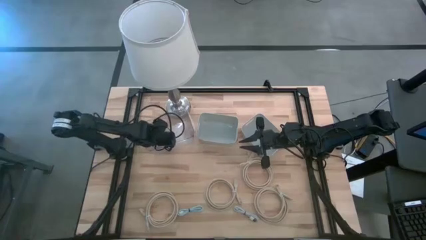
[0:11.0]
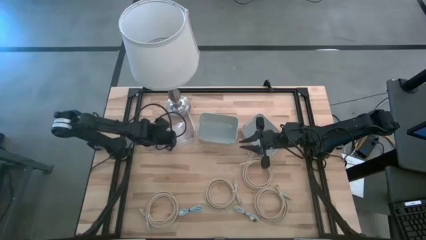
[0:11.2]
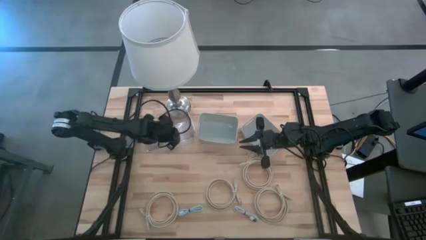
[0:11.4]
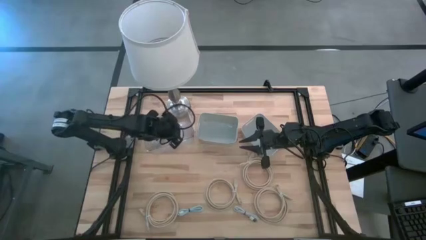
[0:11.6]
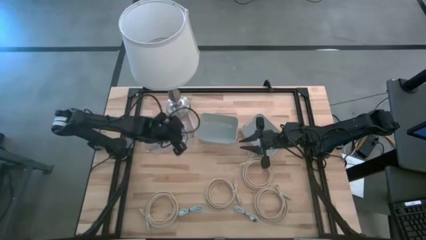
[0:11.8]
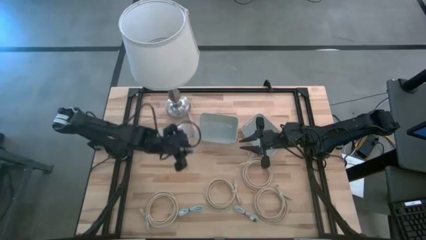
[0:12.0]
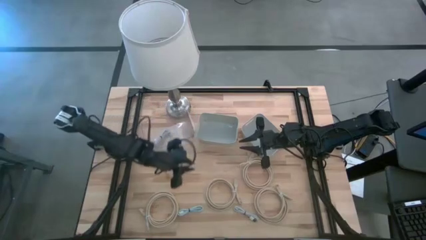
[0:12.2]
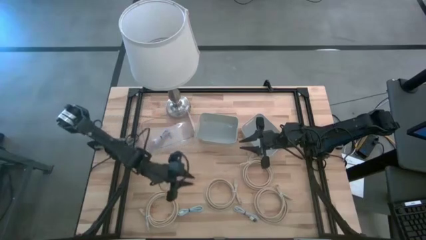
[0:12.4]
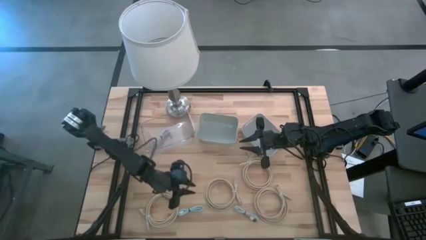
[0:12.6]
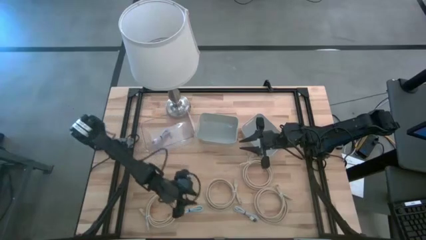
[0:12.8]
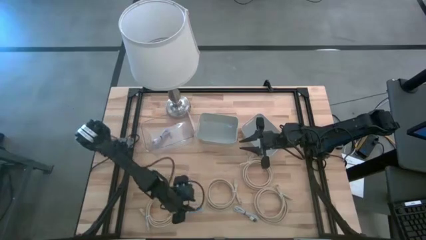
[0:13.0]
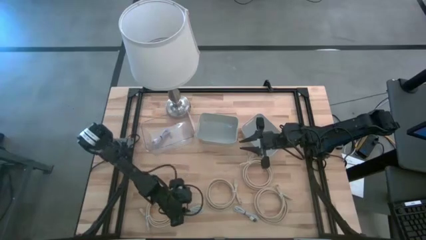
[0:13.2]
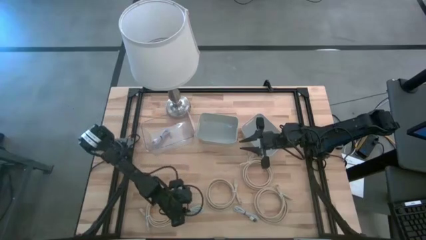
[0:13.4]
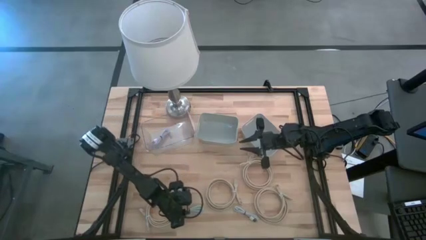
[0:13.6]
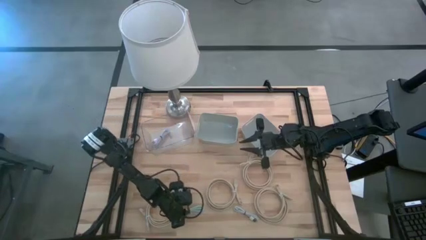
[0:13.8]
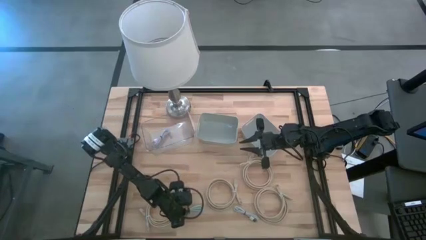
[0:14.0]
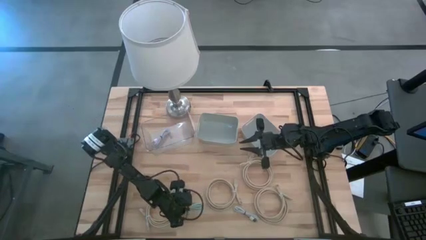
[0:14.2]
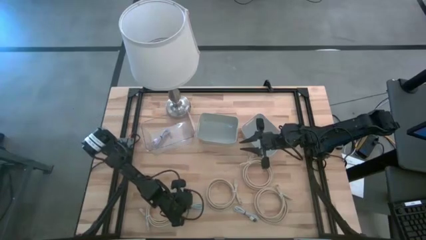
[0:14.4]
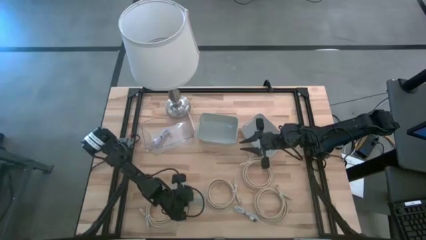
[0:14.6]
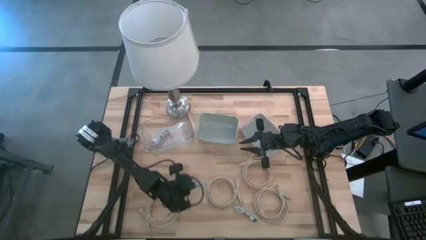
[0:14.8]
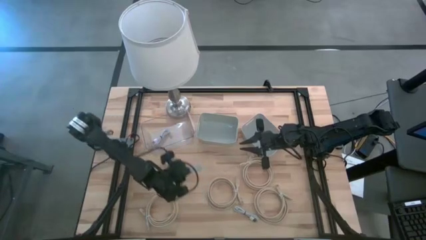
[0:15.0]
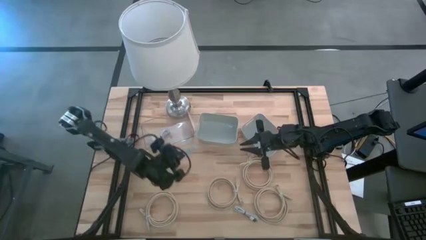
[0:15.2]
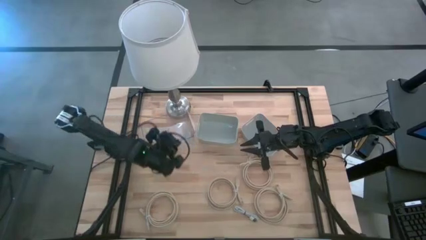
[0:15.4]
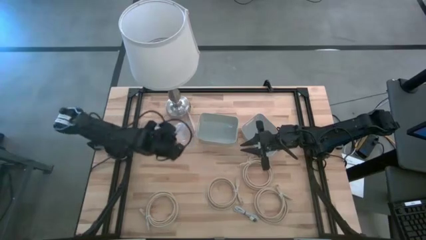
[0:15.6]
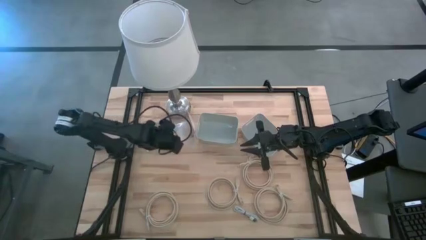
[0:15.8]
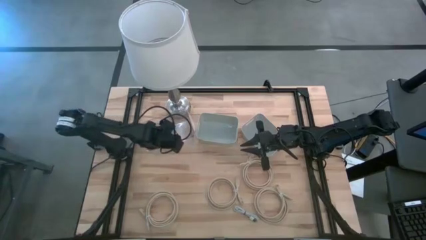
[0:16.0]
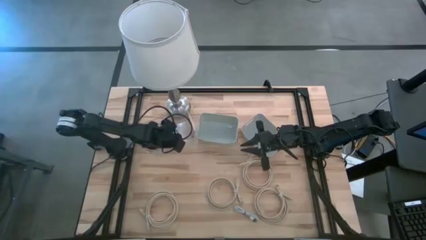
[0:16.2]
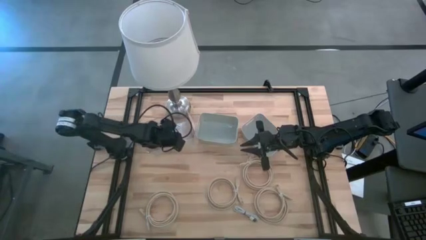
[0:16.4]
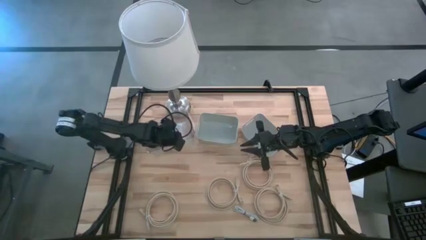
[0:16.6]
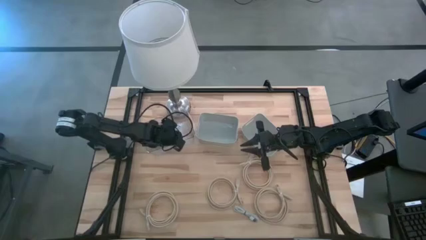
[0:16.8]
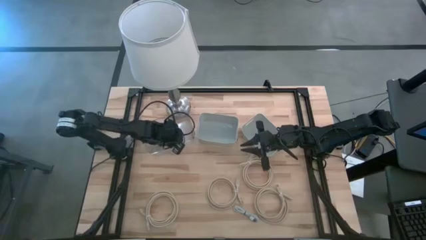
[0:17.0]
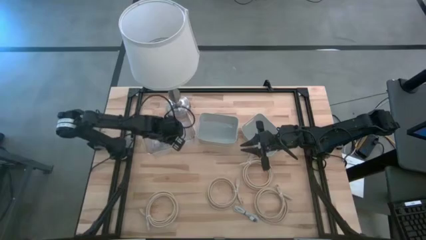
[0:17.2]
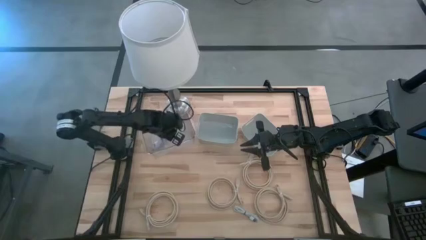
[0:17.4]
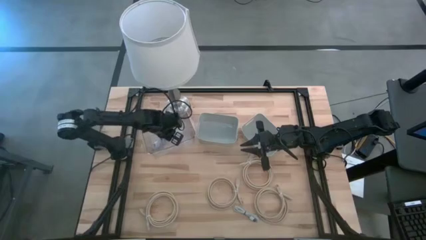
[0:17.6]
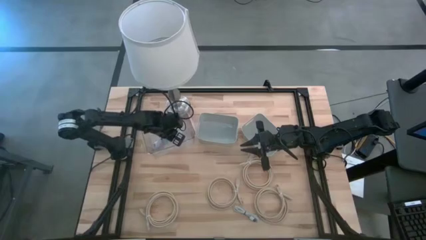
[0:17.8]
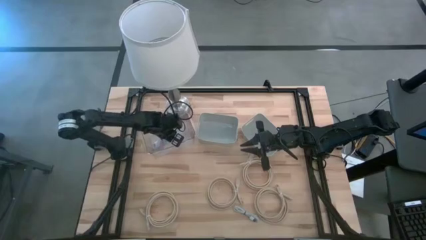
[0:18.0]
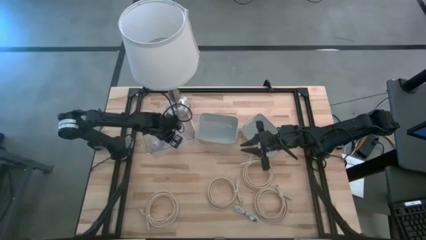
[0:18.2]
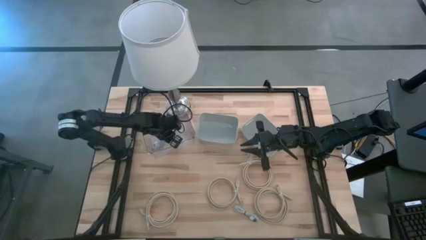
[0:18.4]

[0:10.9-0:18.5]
Task: Pick & Place USB Port
Put the blue usb cable into the transparent bin

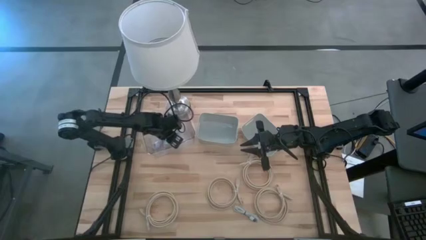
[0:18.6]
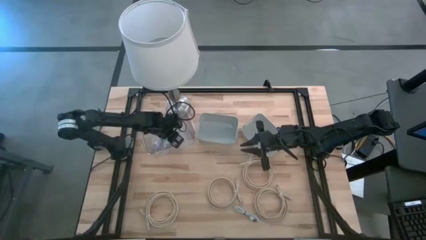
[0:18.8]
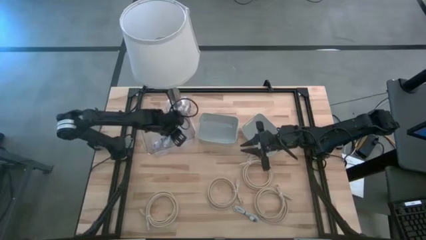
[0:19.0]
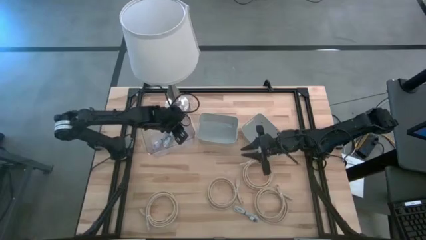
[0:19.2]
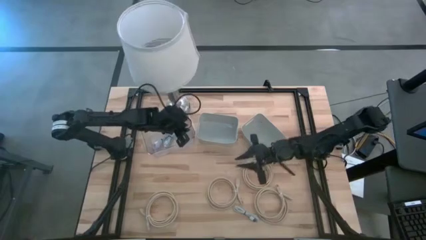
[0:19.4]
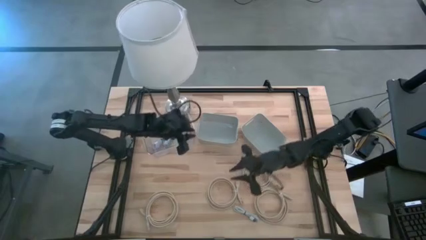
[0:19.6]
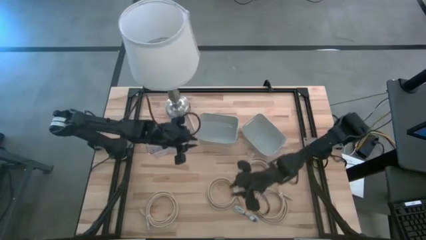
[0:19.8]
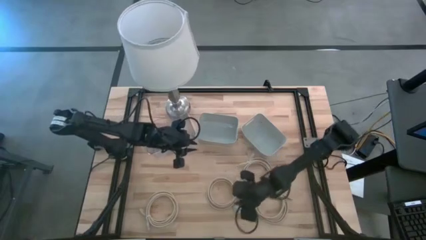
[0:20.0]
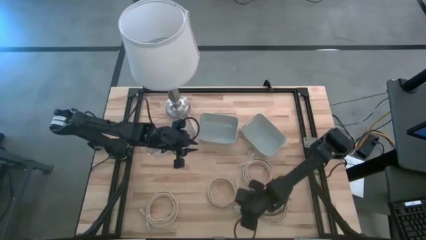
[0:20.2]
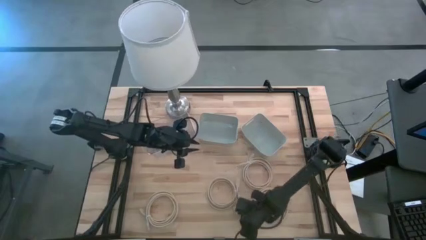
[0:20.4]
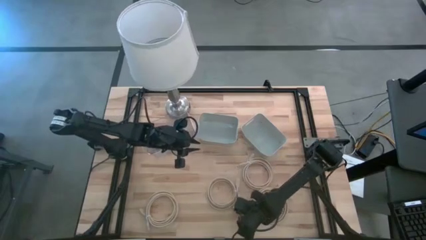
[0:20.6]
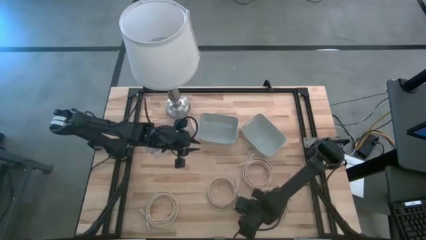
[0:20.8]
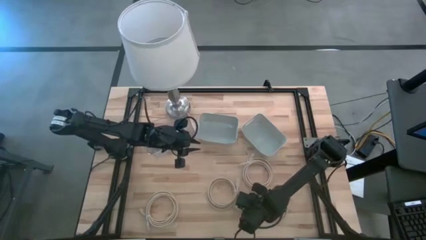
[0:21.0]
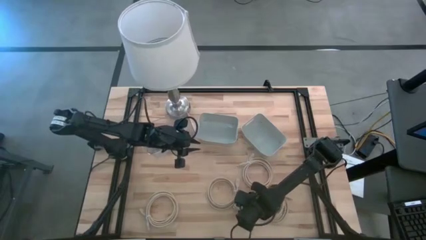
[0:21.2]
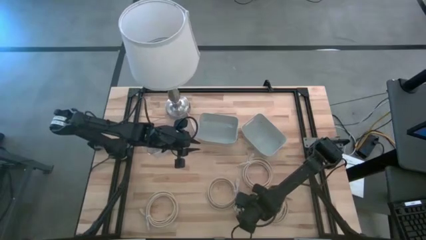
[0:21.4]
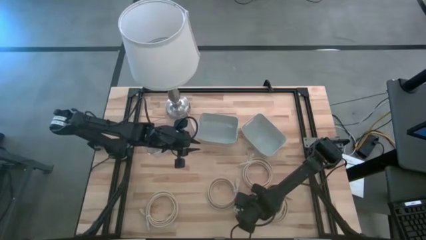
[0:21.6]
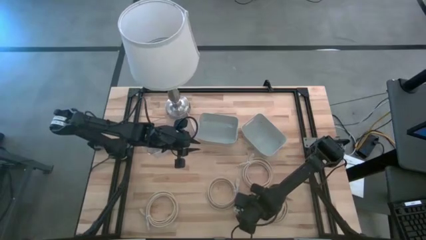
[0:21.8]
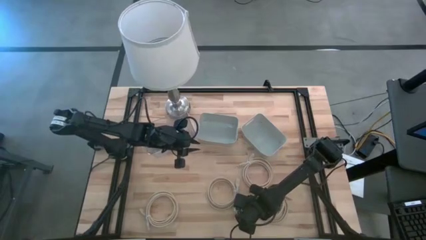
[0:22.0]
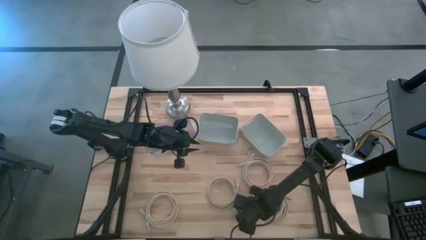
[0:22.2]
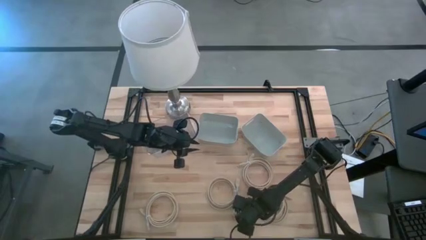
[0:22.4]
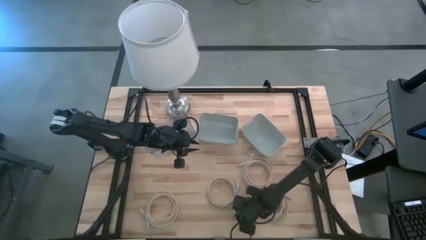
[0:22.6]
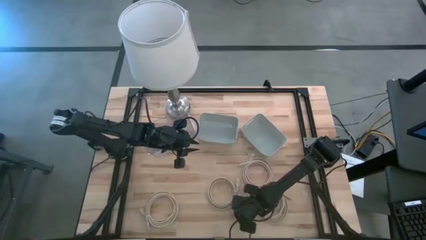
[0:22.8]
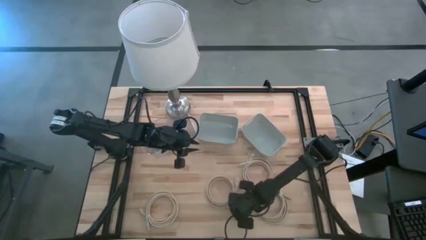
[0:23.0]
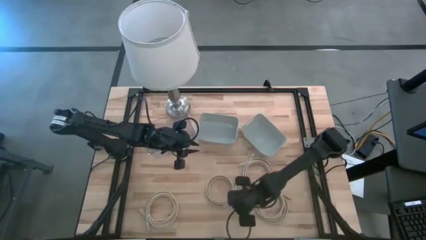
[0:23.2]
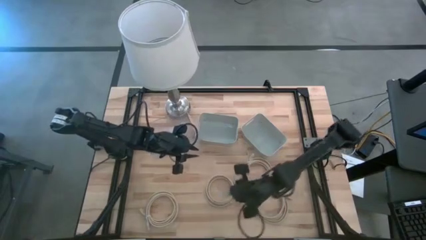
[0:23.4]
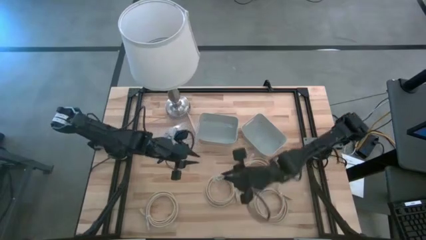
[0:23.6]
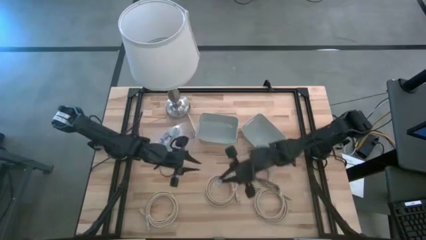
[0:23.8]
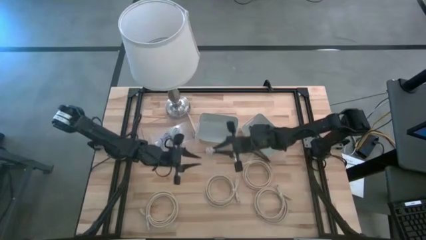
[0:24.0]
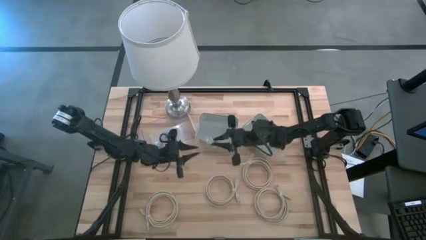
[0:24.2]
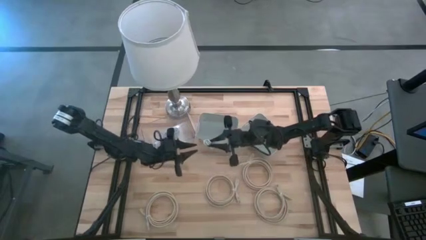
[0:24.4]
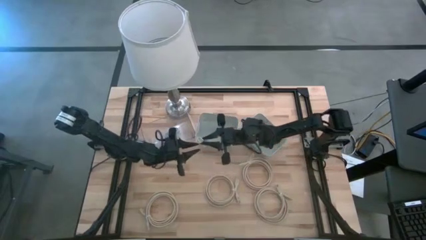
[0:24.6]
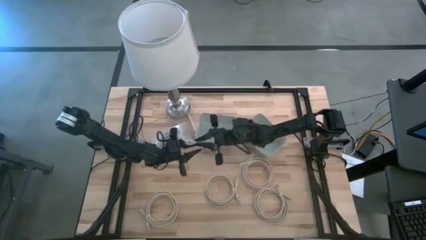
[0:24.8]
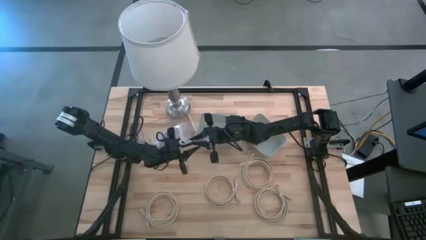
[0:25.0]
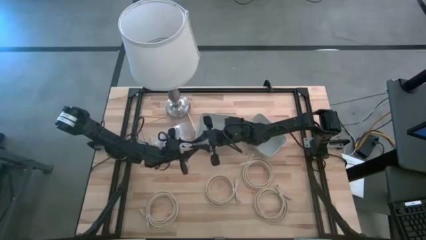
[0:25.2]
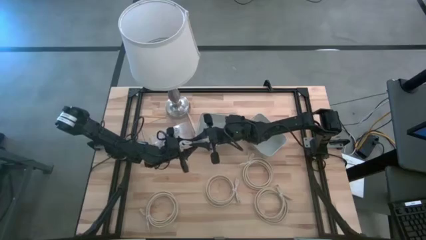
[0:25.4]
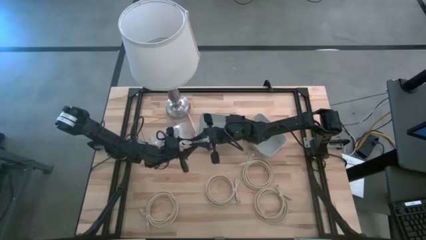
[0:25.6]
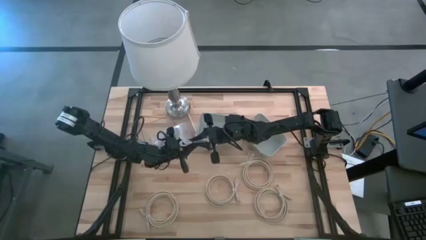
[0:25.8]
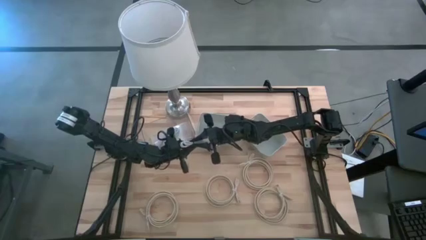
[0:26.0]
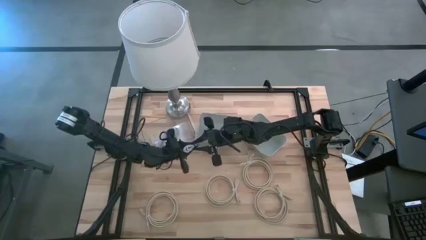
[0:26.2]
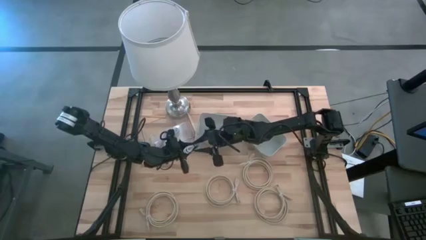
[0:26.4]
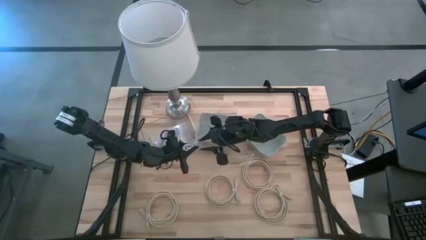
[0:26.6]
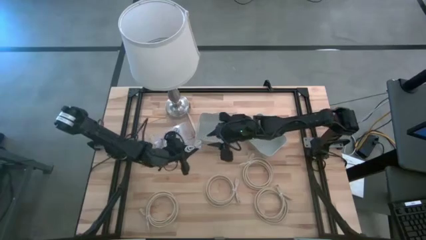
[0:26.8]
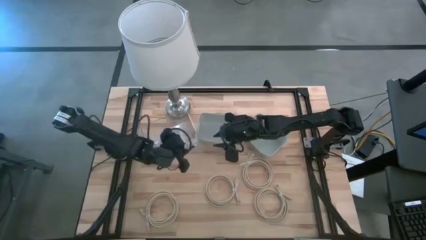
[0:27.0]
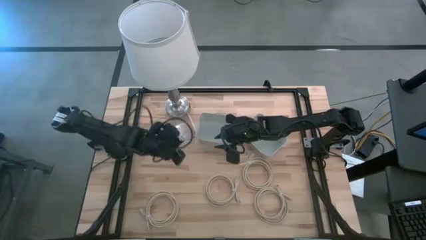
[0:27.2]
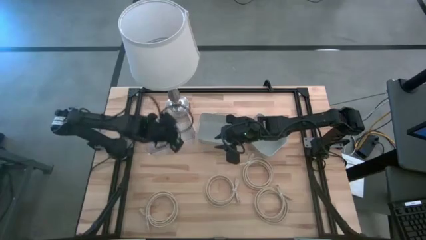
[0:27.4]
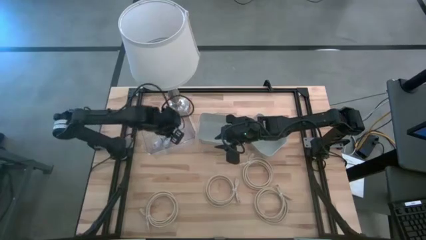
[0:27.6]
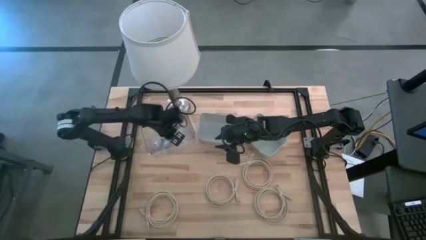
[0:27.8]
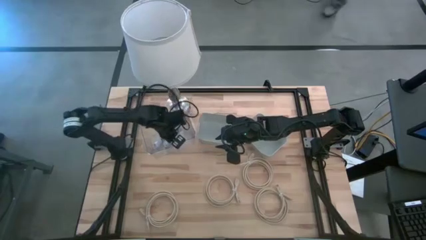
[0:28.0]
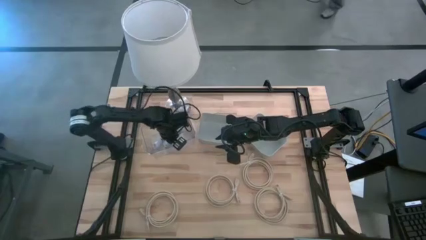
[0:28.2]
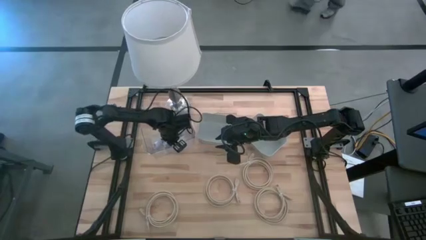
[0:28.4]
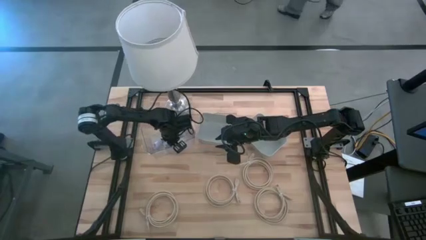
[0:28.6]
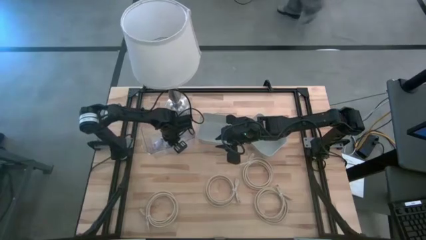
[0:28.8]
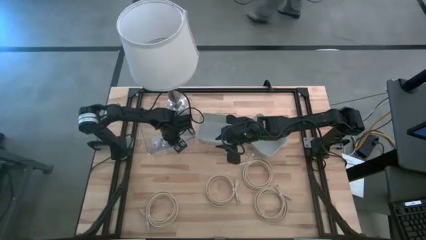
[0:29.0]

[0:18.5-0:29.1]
Put the blue usb cable into the transparent bin
